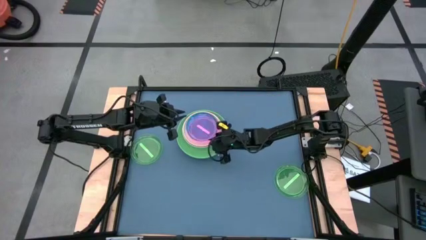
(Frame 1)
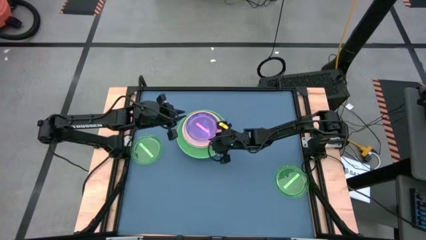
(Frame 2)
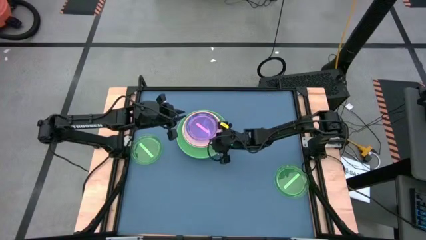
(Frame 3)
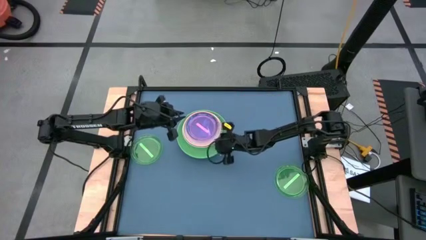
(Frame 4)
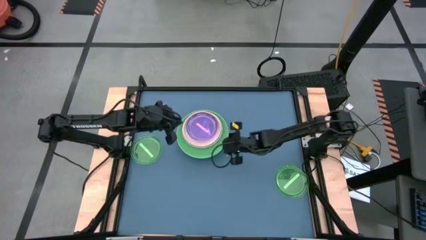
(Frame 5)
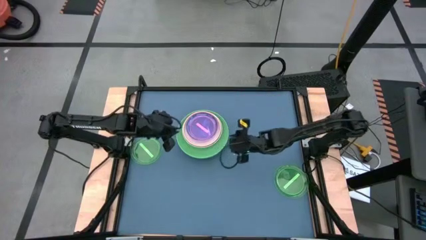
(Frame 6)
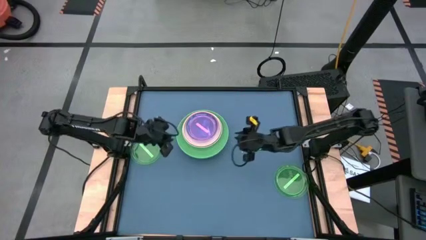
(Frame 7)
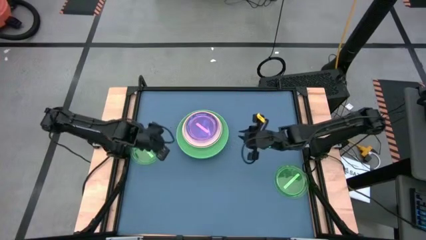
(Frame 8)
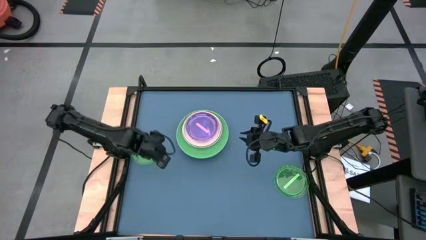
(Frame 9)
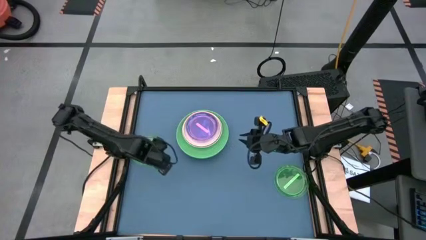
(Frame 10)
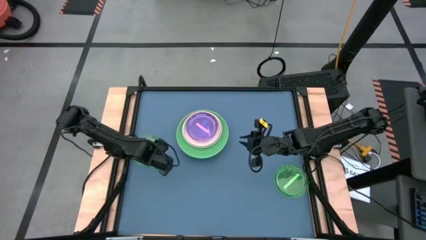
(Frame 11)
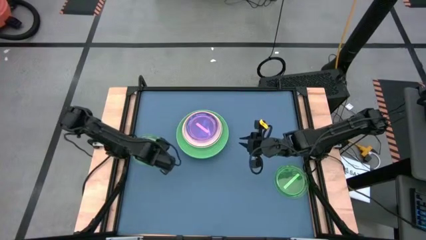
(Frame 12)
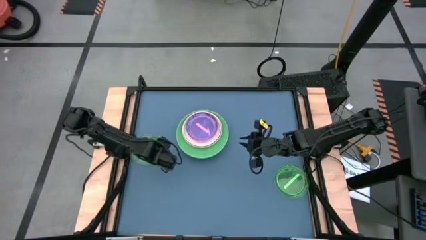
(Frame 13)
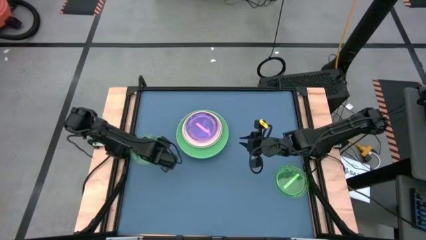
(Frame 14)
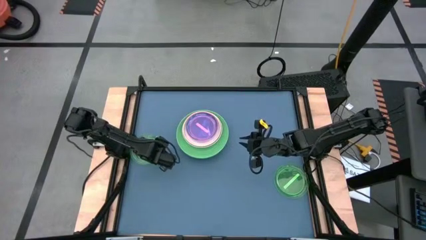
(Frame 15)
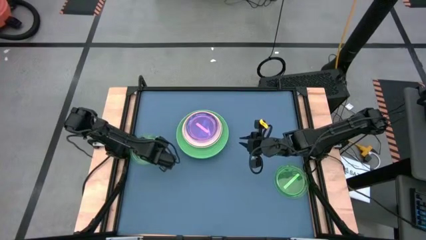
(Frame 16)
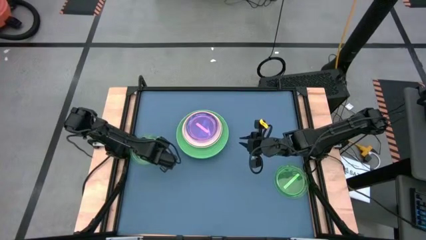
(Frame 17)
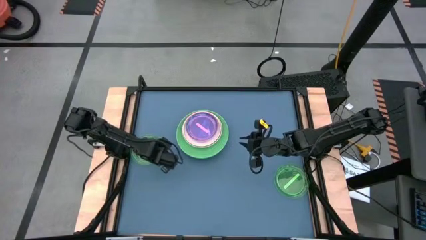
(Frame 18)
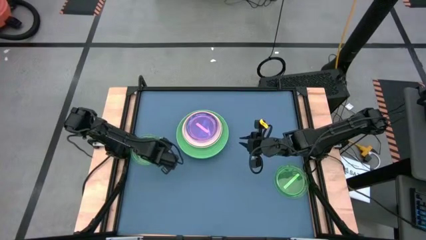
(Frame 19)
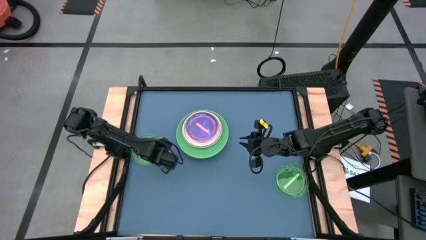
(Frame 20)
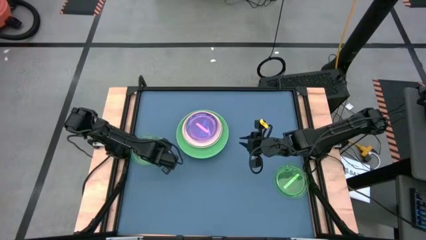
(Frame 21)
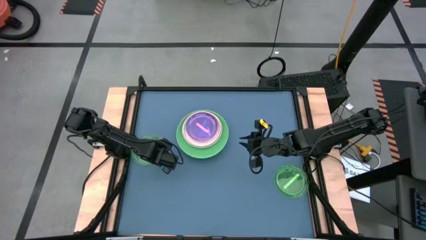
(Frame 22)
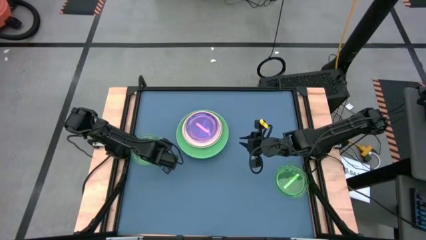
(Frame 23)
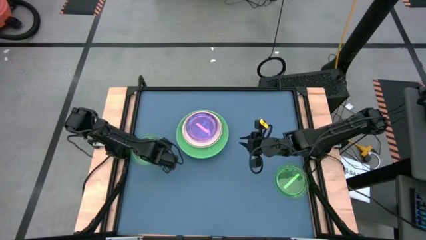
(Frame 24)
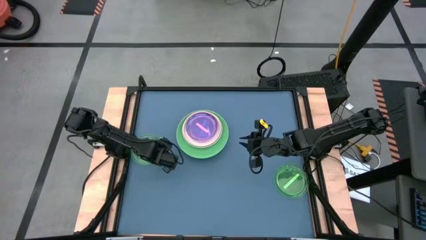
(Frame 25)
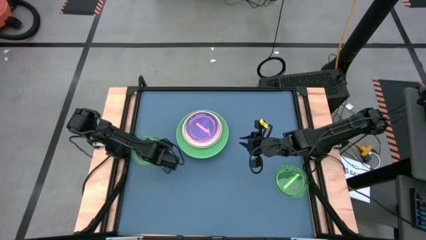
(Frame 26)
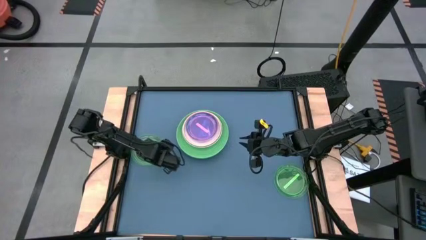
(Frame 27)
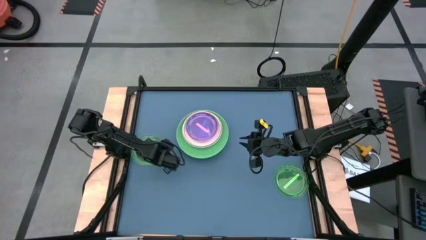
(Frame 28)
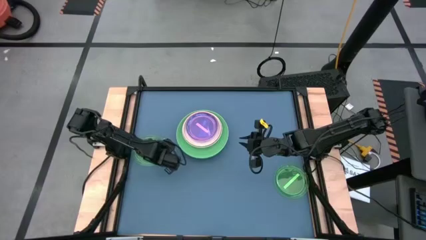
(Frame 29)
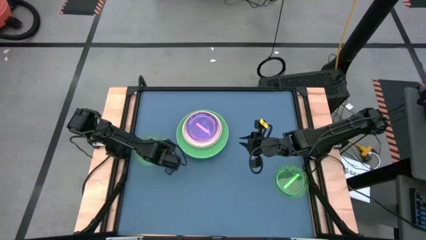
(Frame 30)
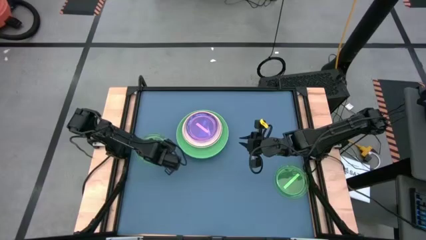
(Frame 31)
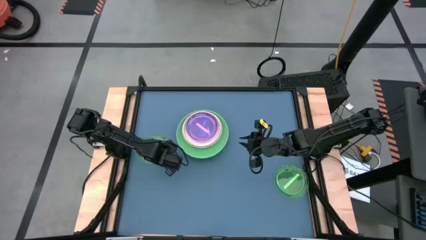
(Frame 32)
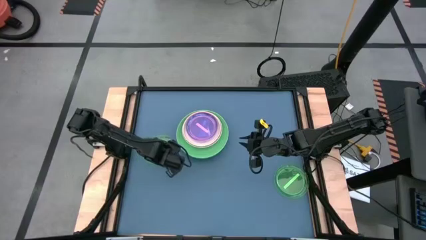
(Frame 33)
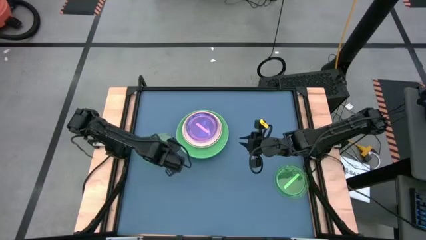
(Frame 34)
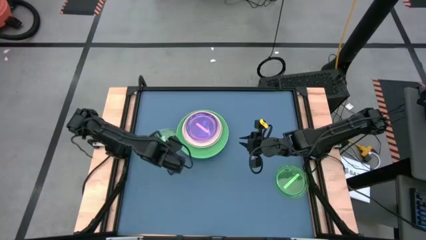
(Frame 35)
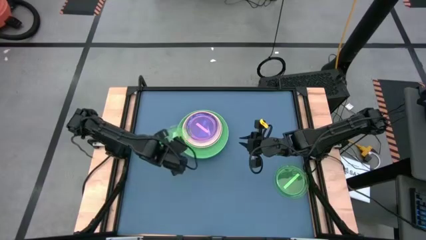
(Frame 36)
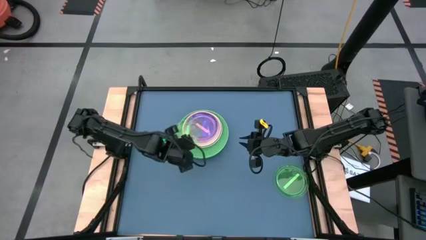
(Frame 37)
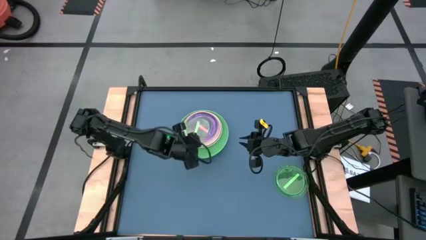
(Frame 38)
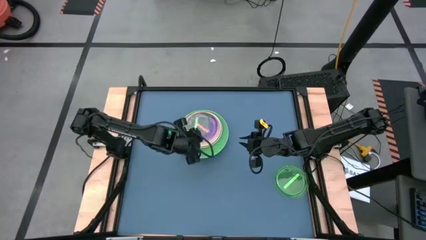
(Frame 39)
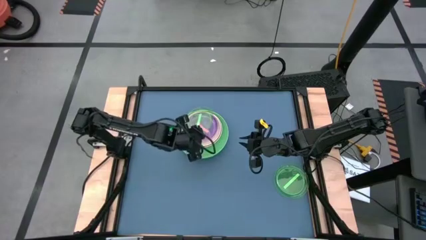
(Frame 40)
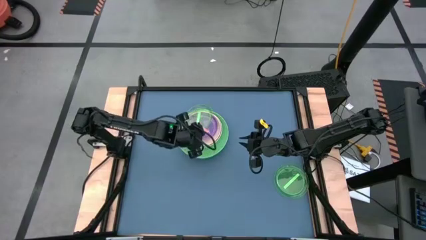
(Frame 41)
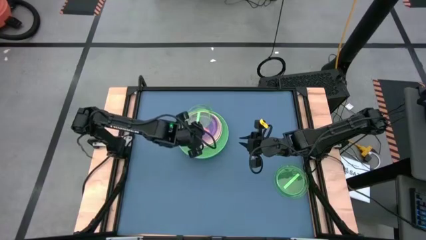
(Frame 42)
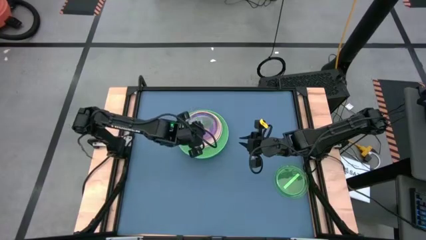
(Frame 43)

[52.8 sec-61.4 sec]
Task: Stack plastic plates
Stack the left light green plate on top of the pink plate

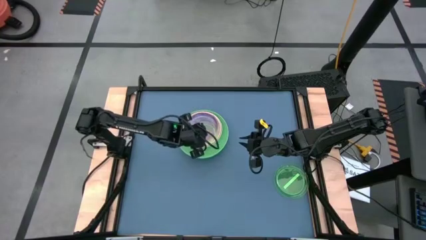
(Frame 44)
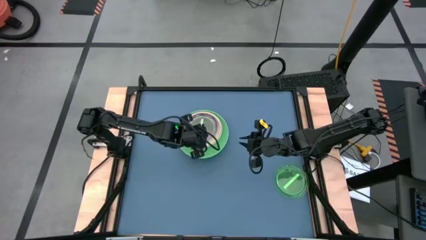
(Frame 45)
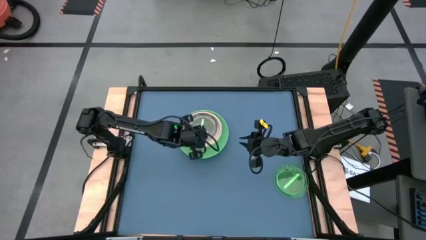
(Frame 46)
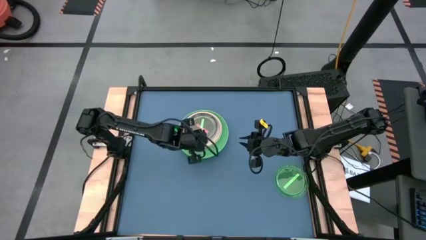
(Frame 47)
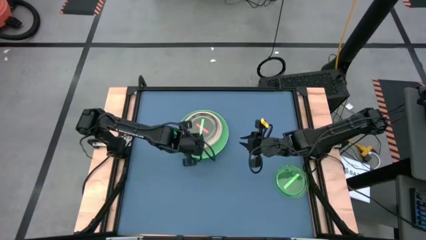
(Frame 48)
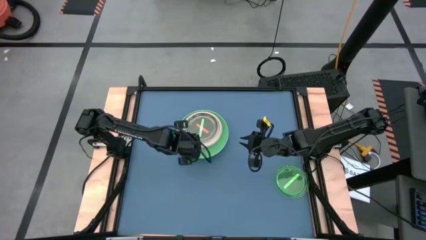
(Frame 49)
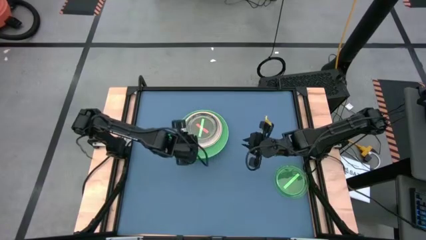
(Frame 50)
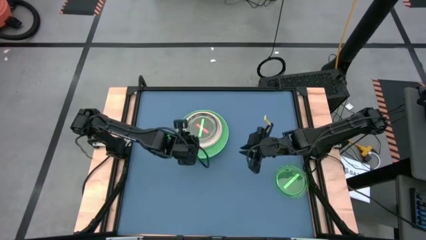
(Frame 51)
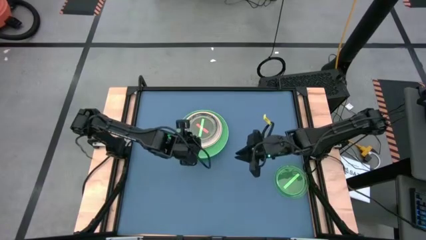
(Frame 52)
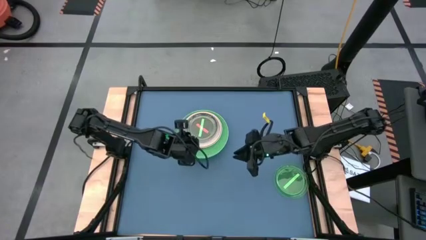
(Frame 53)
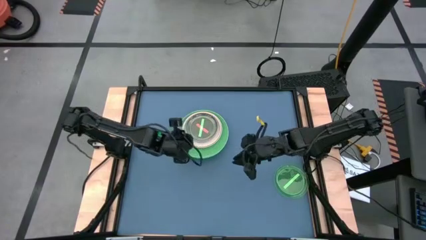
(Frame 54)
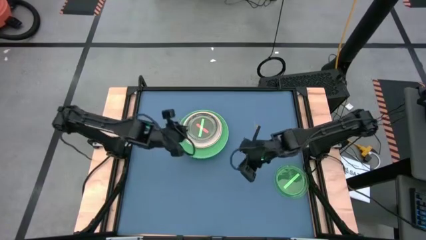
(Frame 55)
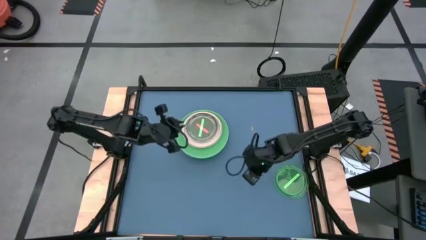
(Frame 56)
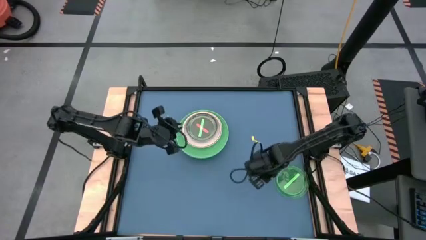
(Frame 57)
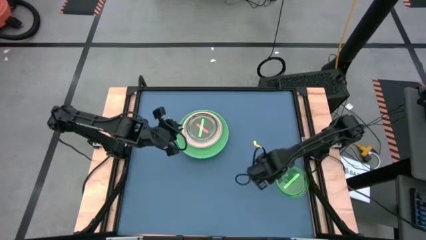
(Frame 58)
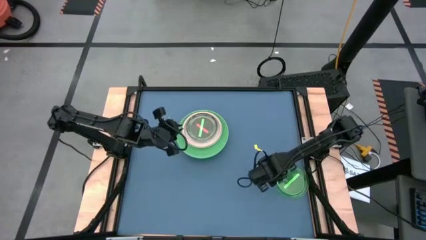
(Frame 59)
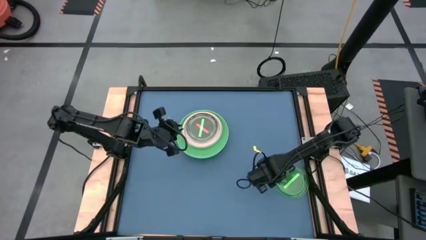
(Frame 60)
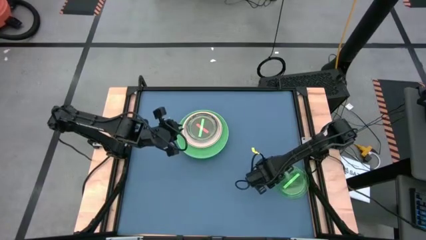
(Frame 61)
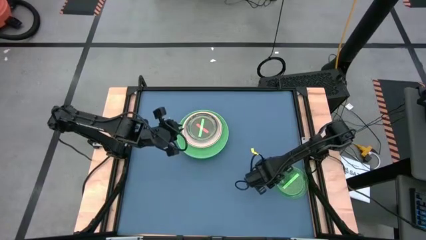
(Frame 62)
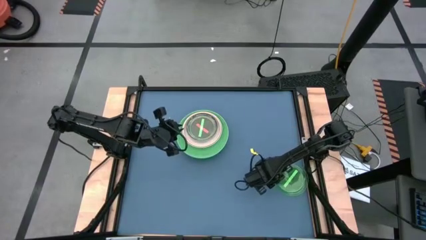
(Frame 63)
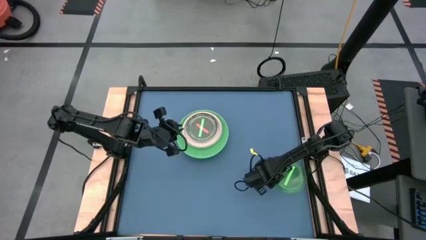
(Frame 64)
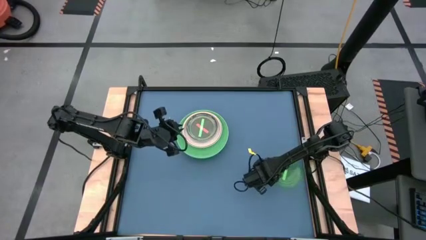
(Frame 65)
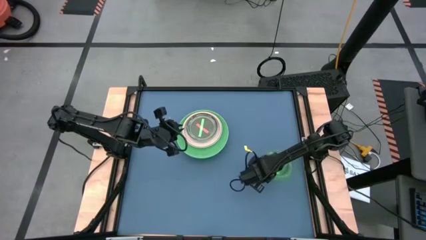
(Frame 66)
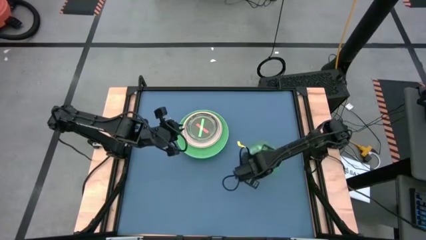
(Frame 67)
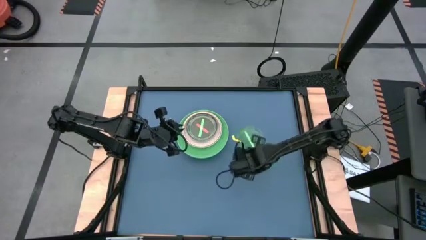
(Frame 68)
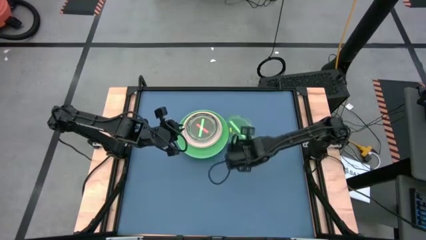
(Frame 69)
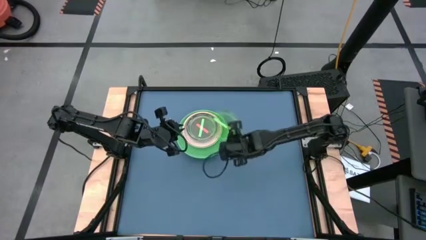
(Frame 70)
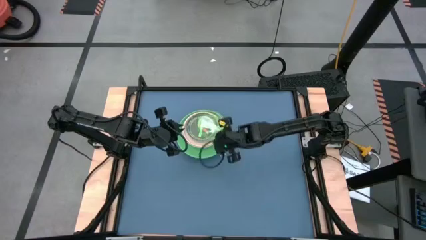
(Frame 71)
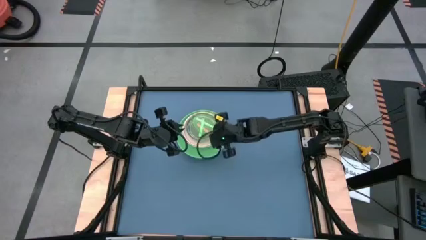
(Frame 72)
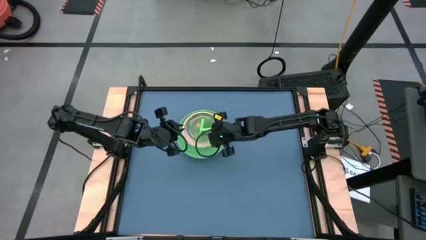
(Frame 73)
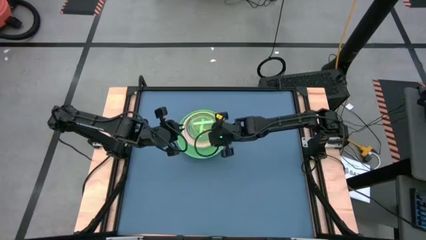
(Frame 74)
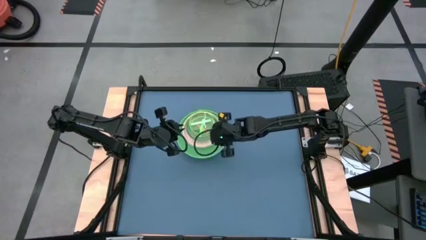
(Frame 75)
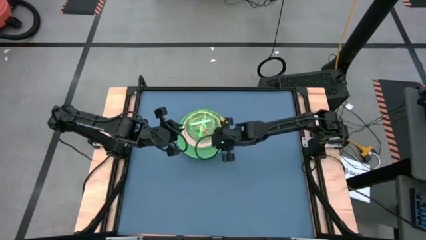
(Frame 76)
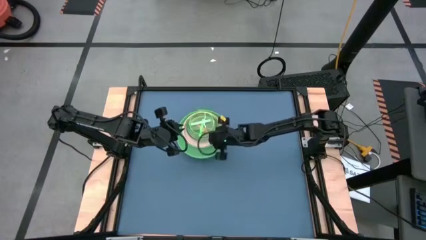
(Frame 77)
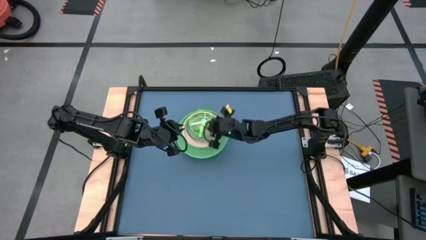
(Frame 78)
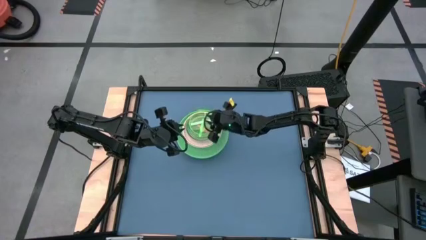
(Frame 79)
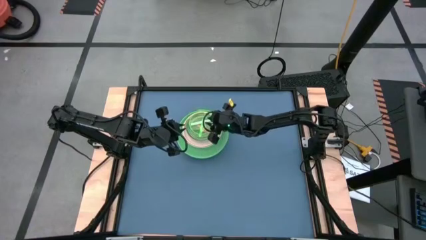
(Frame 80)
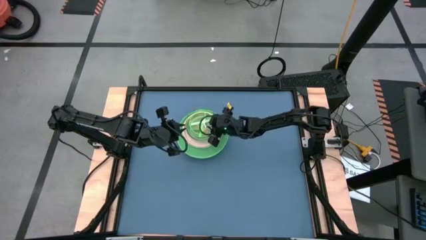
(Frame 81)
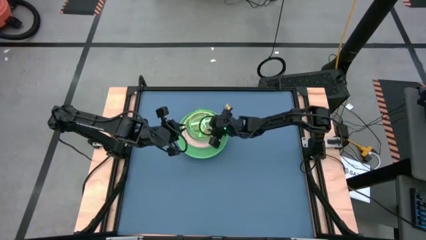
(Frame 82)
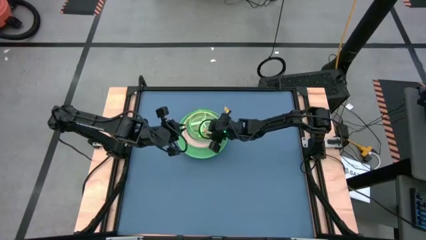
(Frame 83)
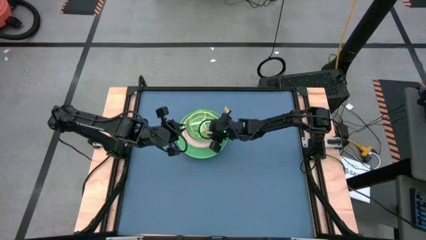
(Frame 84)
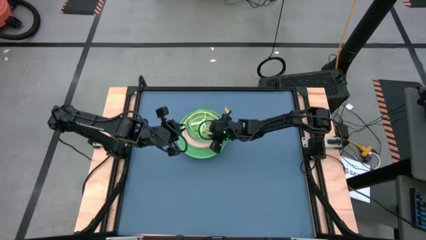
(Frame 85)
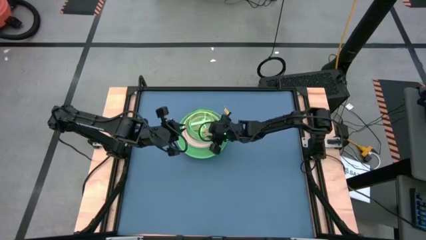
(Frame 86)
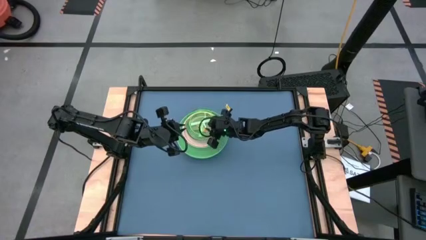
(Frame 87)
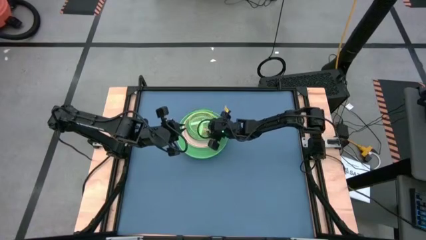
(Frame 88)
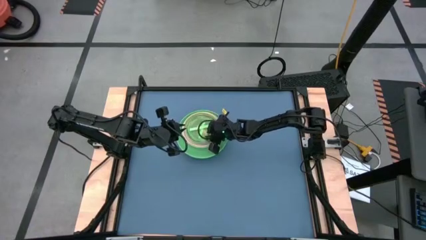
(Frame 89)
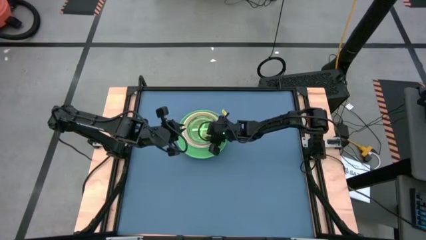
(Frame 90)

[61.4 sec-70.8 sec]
Stack the light green plate on top of the light green plate
